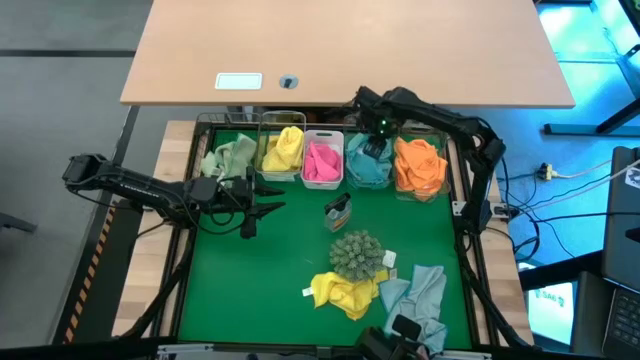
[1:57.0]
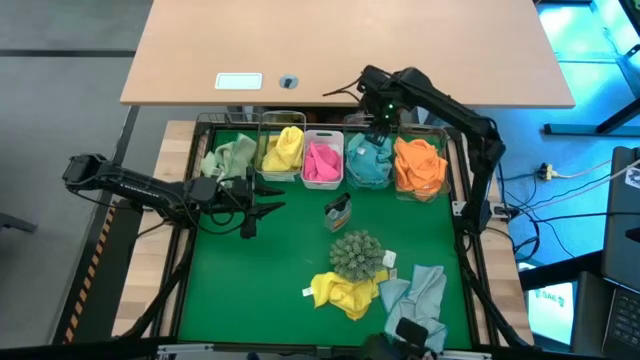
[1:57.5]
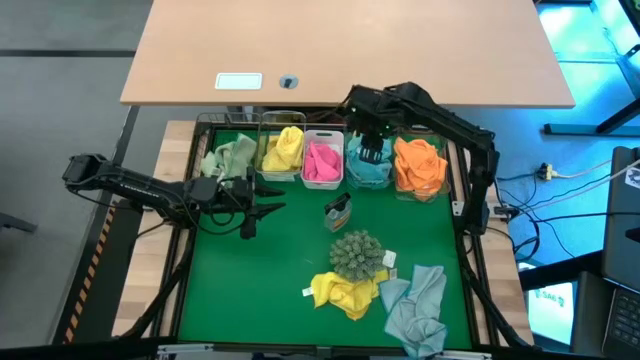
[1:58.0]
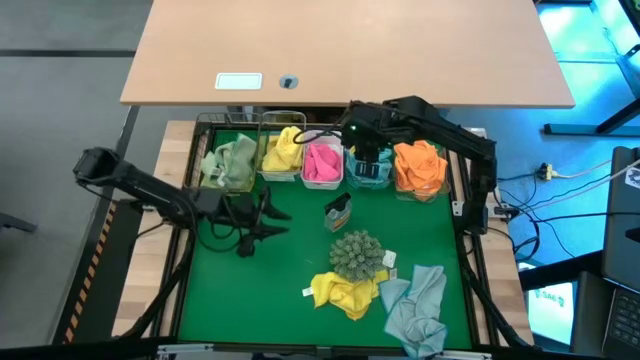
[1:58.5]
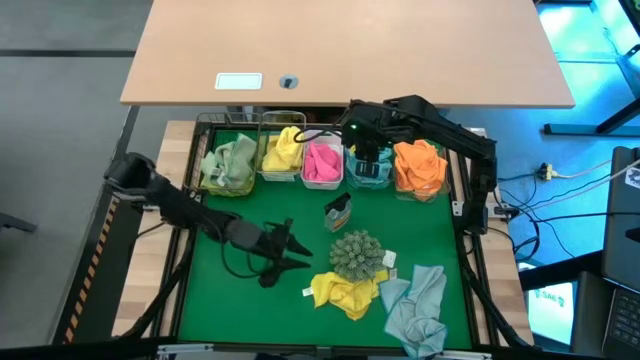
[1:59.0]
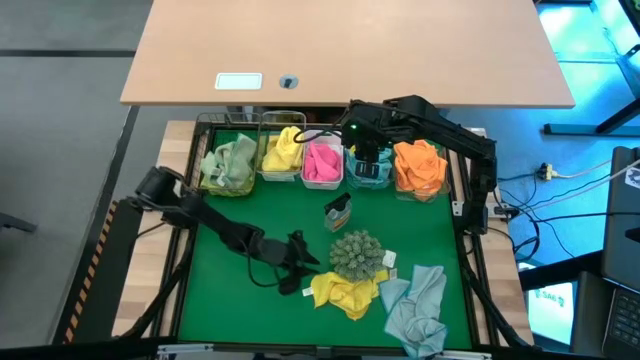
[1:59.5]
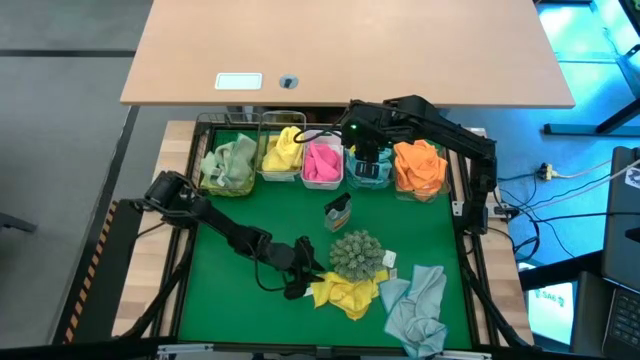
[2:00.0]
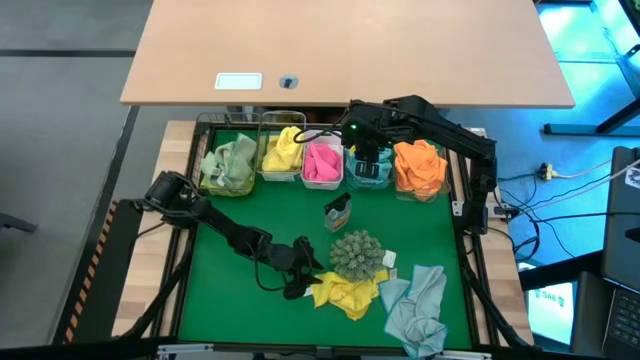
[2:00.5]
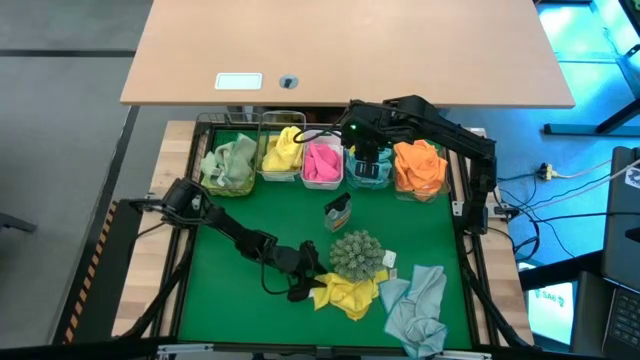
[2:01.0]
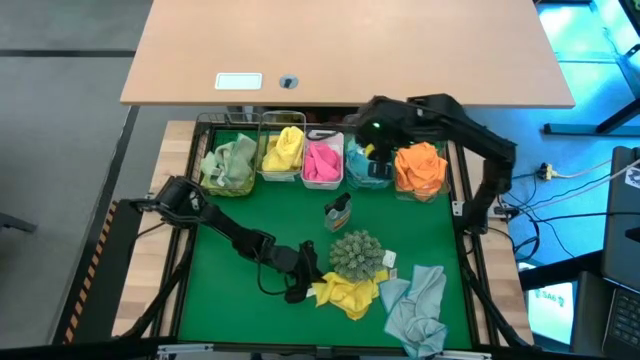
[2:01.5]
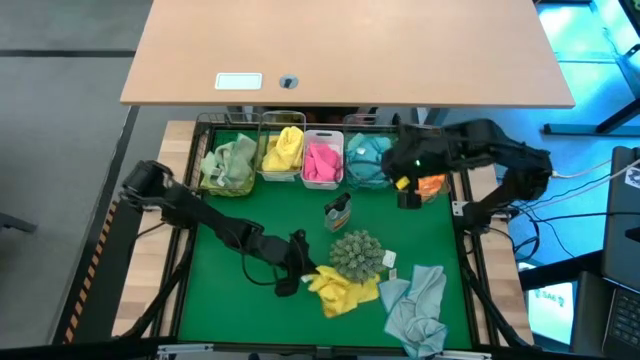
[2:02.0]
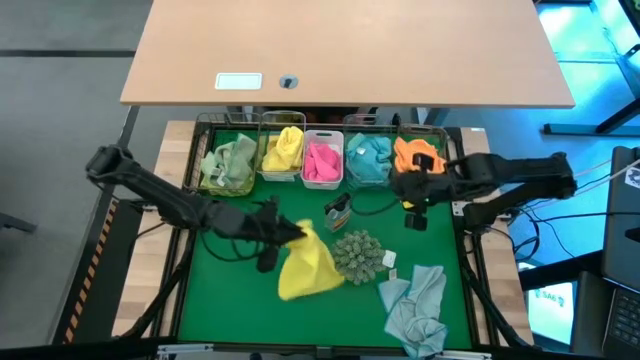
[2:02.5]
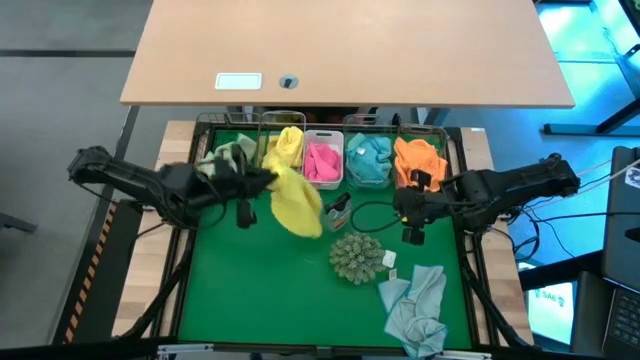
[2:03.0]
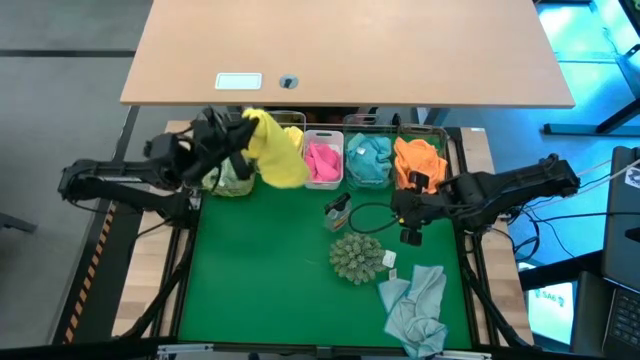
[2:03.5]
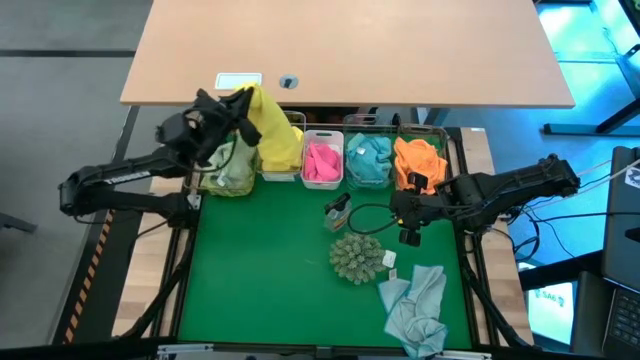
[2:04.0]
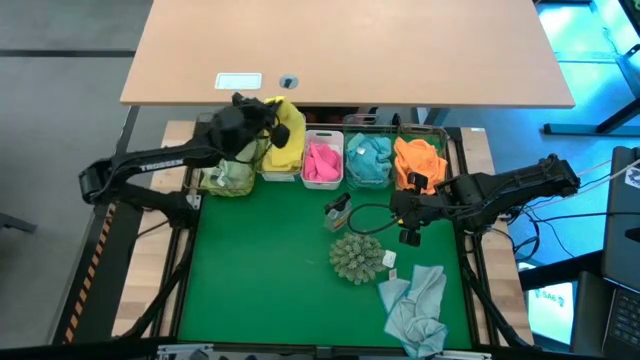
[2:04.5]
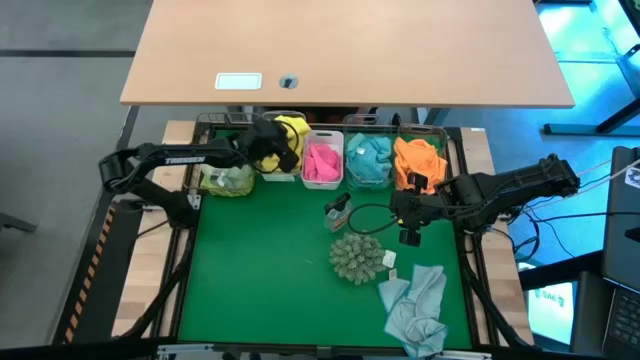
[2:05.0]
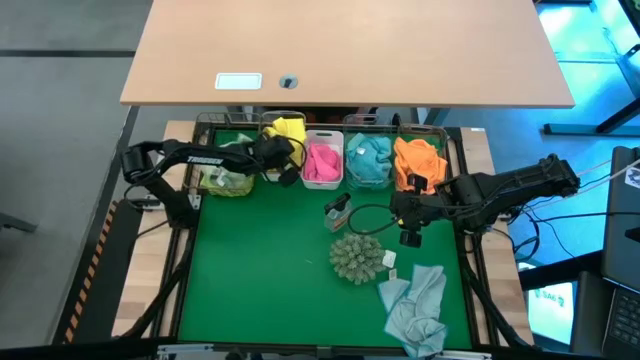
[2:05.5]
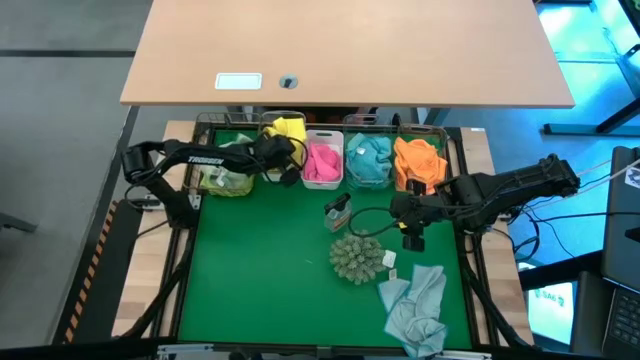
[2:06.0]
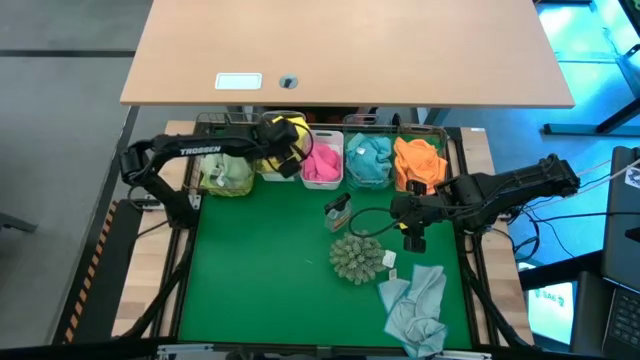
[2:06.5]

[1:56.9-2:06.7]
Task: Sort microfiber towel by color & place in baskets
Put the yellow microfiber towel into the left transparent bin

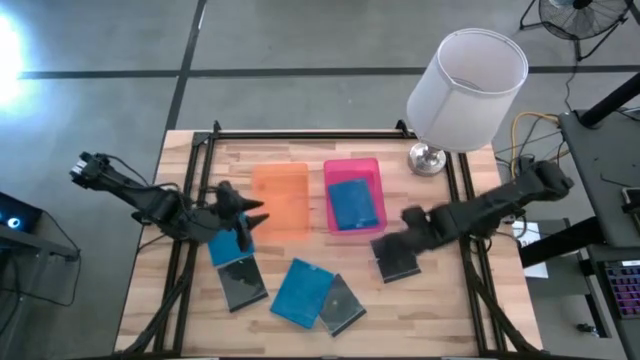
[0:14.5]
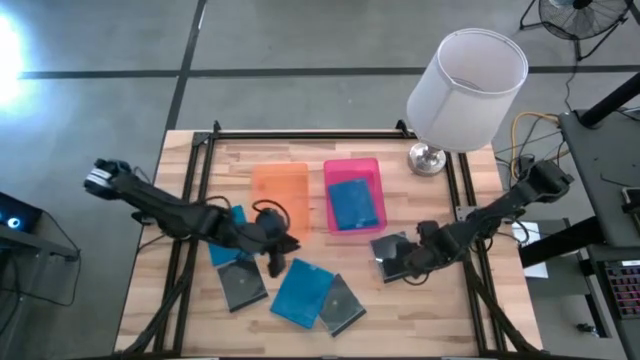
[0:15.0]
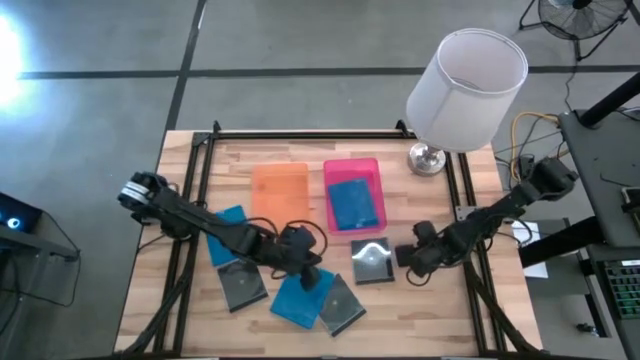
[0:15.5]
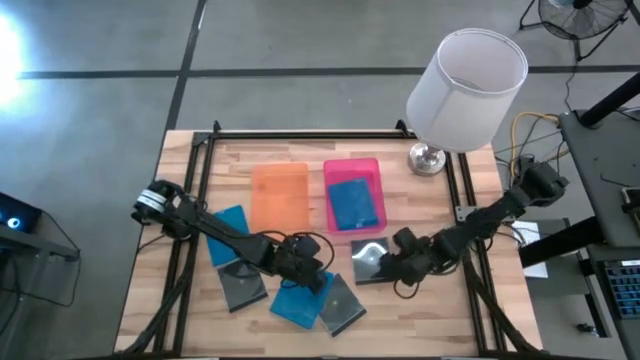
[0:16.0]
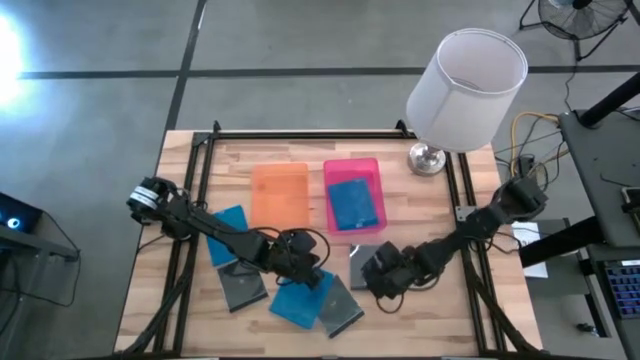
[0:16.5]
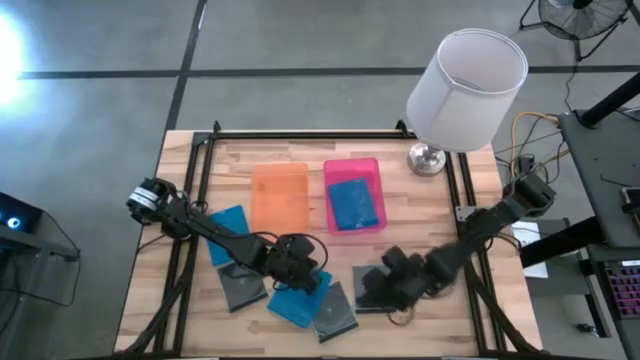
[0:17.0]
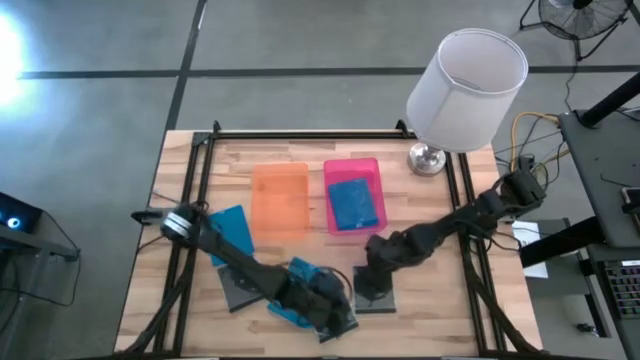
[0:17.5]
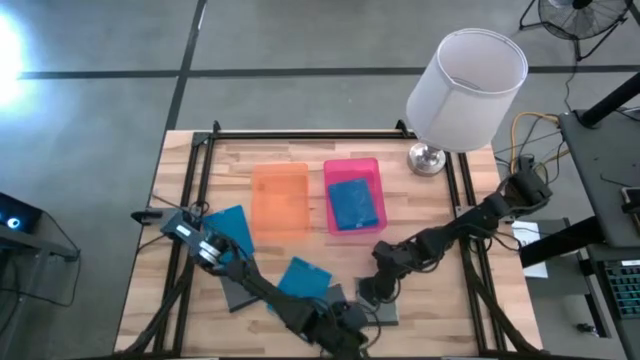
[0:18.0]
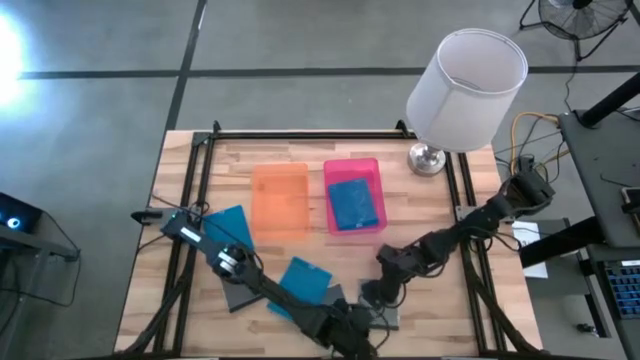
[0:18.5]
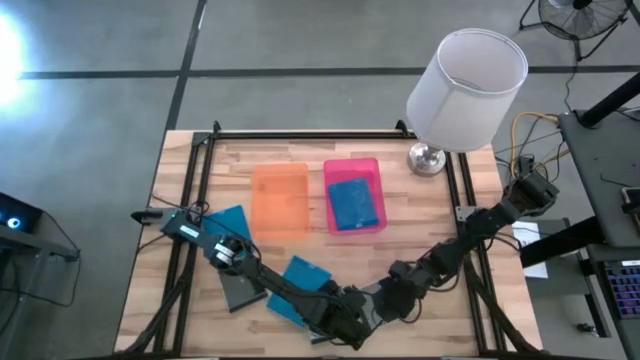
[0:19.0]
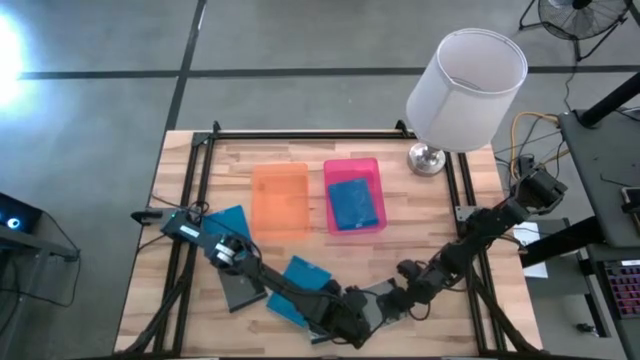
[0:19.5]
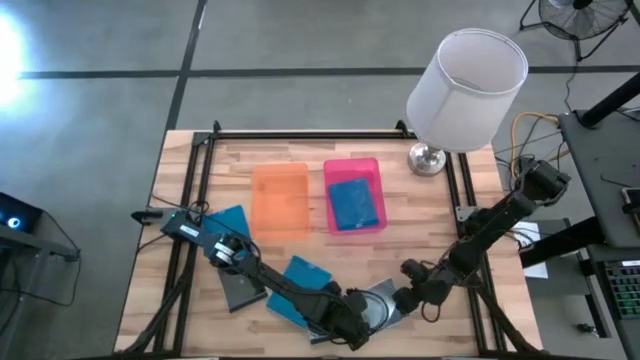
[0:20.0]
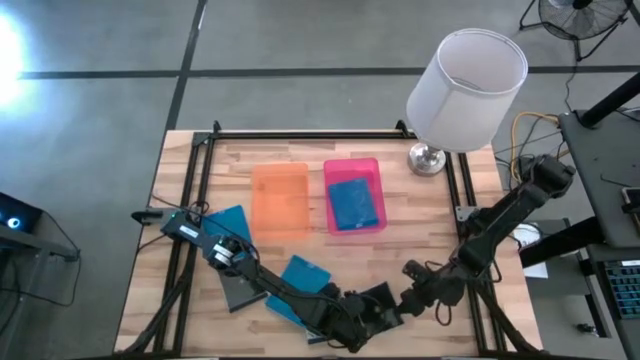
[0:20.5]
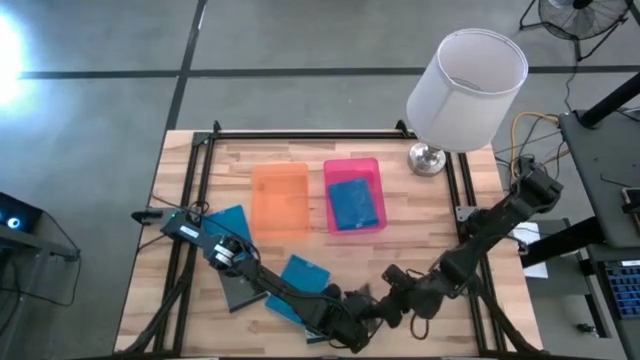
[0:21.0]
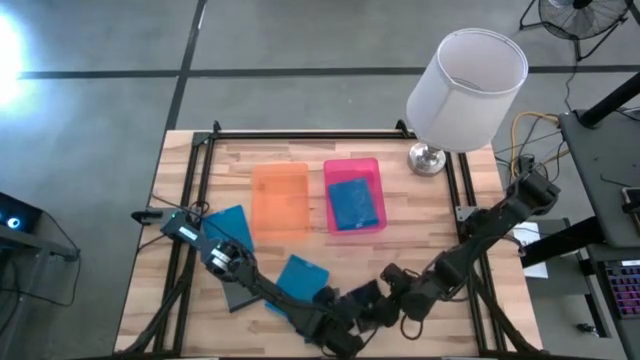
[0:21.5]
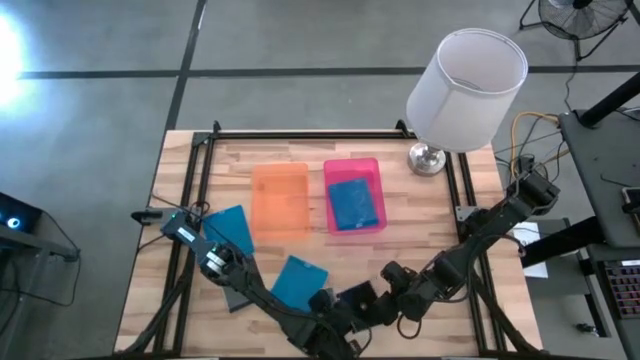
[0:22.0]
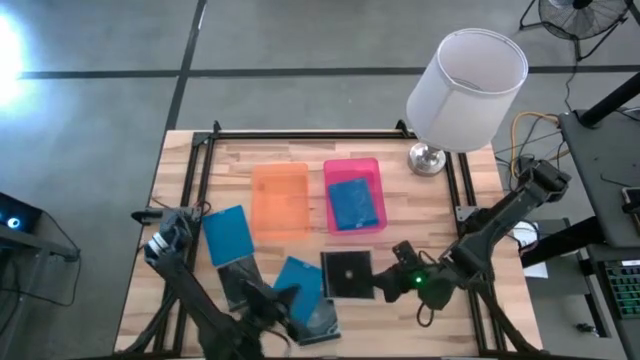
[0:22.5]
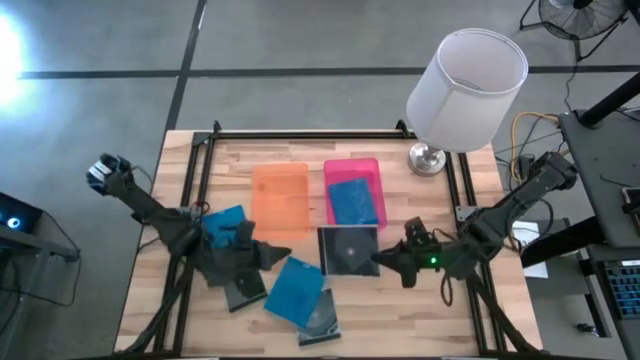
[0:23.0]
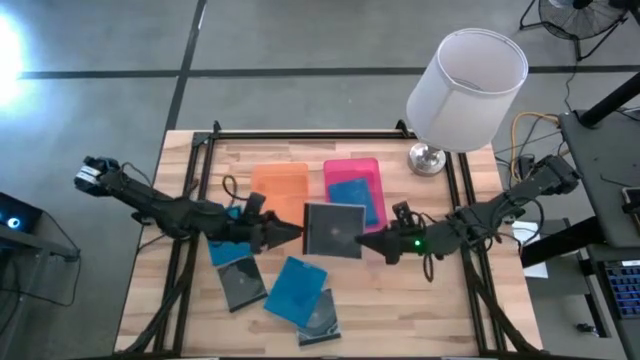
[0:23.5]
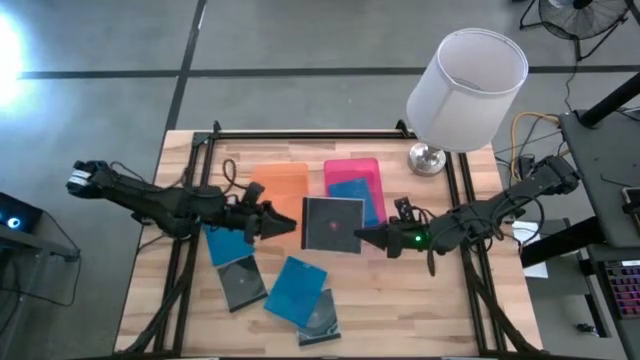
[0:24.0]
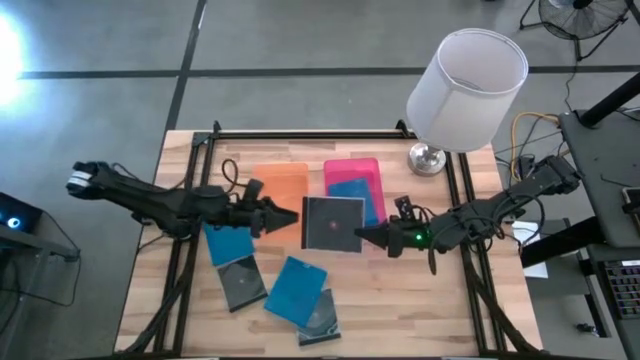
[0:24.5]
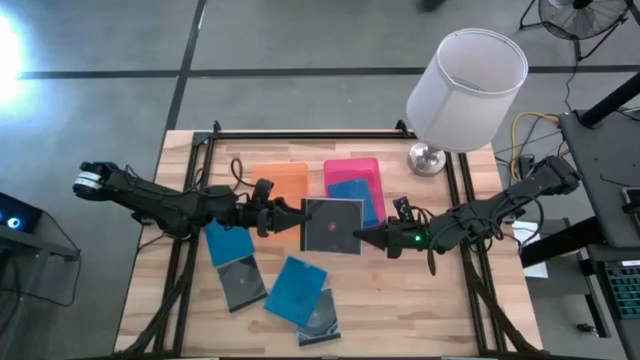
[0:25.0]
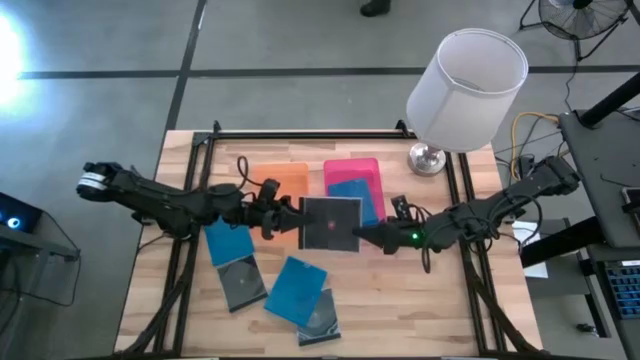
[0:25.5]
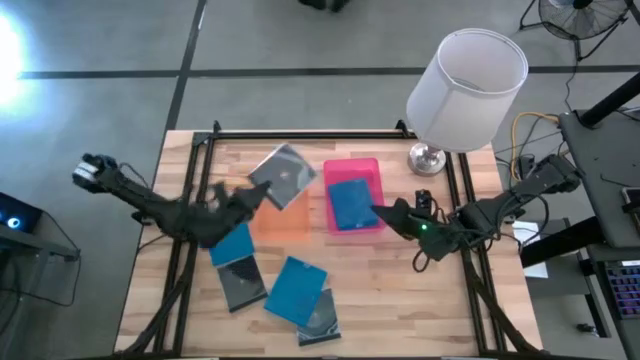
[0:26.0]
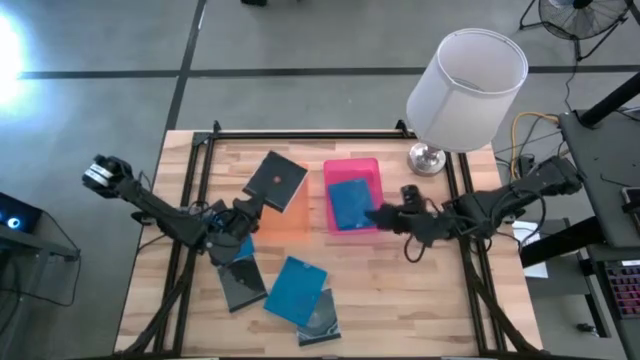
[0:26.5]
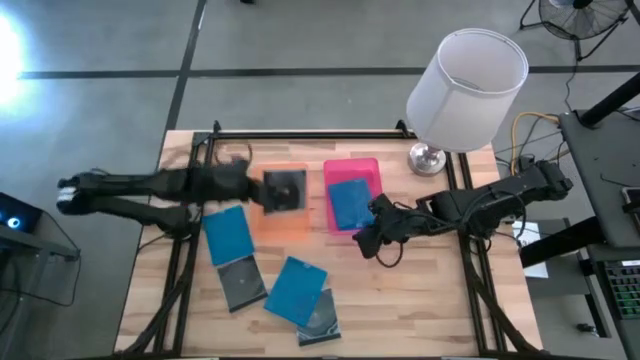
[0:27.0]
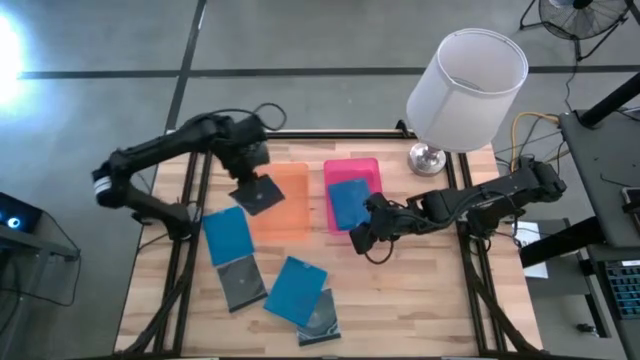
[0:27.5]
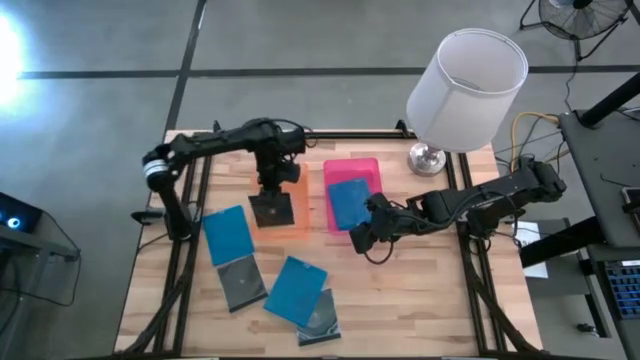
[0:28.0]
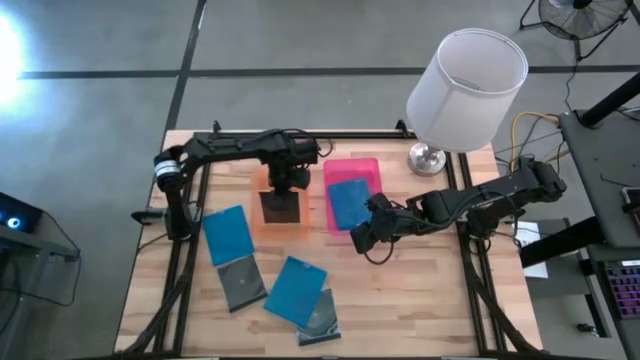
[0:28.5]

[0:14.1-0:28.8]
Task: Pick & place jewel cases by type
Put the right black cd case into the orange bin
